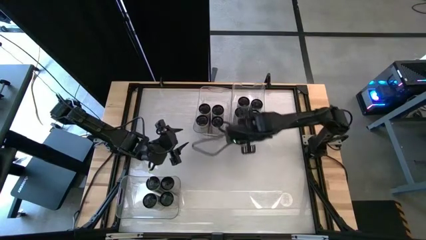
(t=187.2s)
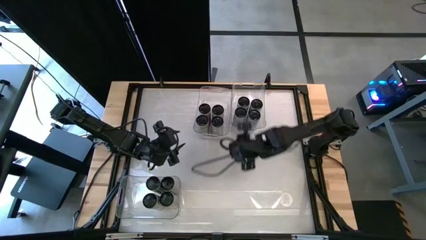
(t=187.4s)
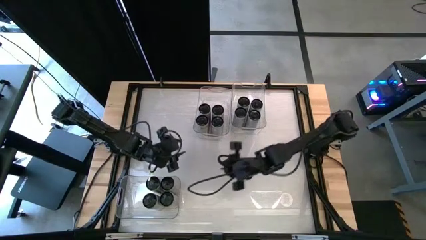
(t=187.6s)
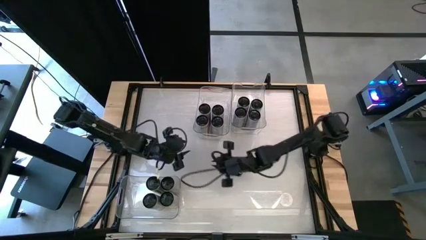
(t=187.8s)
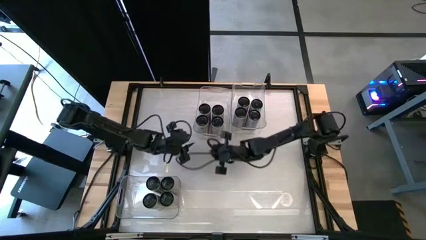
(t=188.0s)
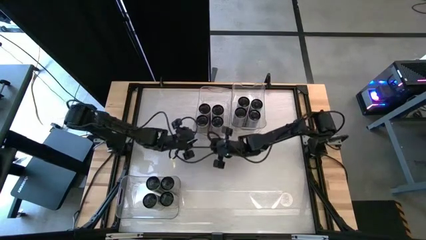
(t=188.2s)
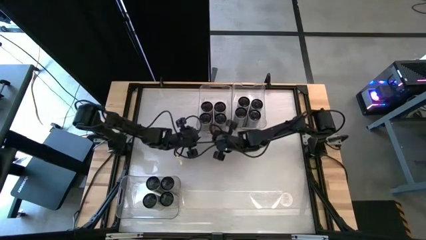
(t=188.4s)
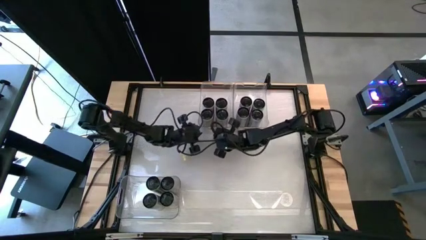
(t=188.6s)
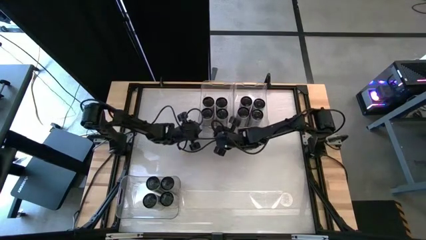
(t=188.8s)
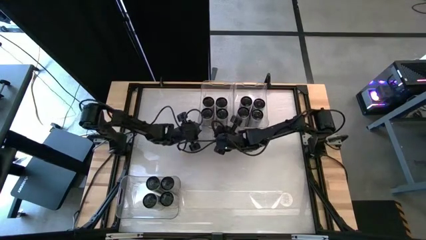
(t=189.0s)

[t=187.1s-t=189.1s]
Task: Sort soda cans
Adjust the top middle transparent bin

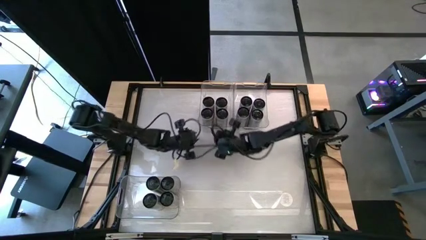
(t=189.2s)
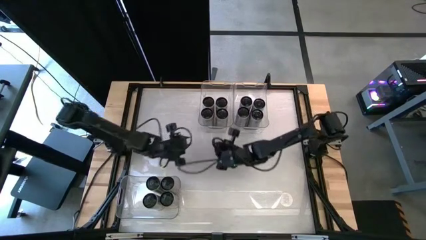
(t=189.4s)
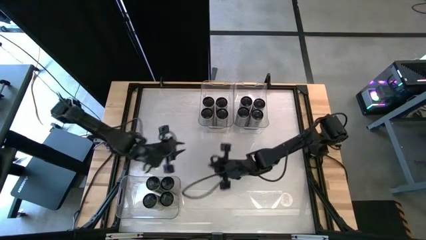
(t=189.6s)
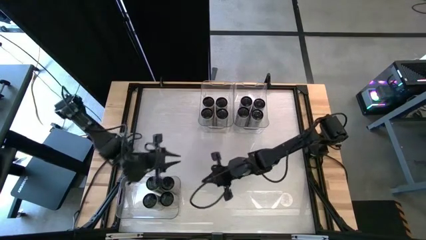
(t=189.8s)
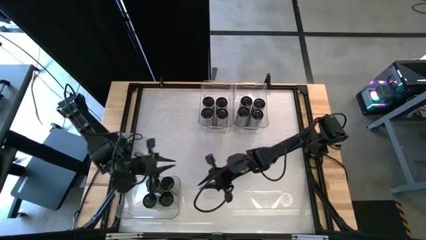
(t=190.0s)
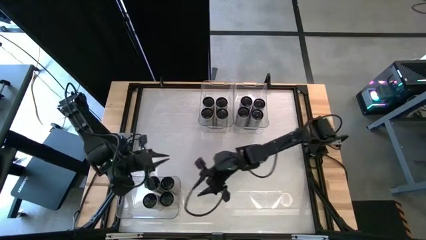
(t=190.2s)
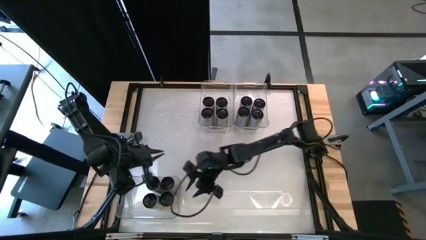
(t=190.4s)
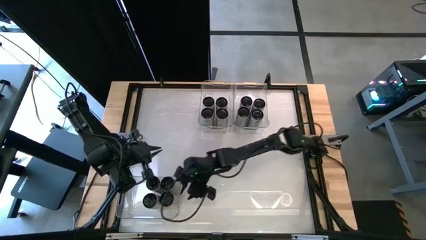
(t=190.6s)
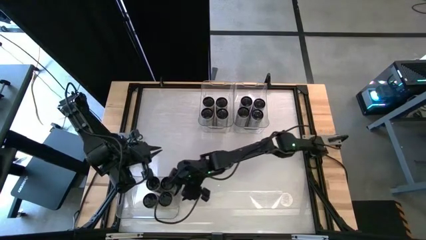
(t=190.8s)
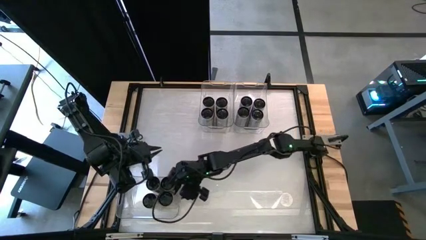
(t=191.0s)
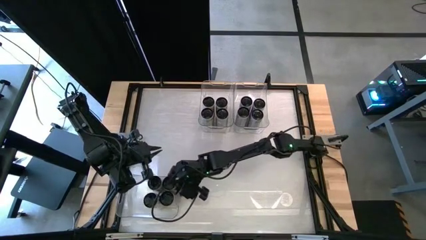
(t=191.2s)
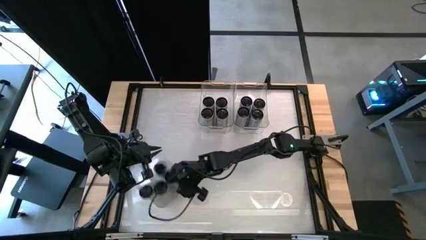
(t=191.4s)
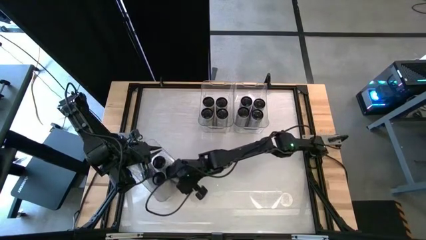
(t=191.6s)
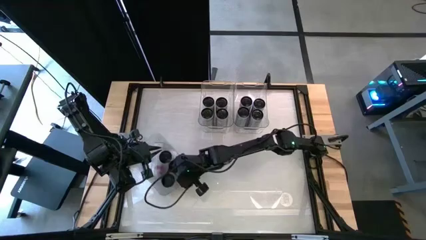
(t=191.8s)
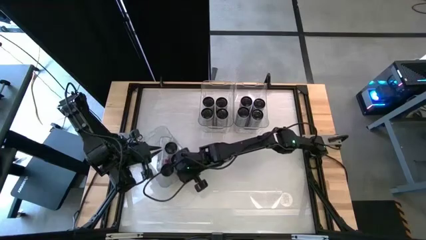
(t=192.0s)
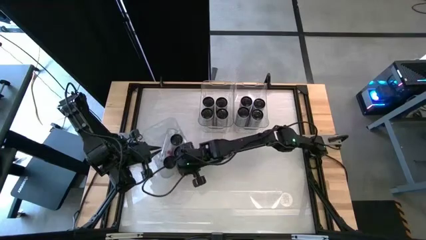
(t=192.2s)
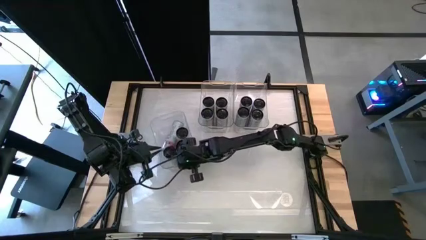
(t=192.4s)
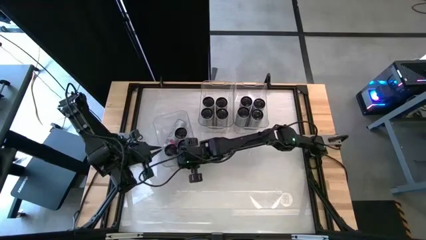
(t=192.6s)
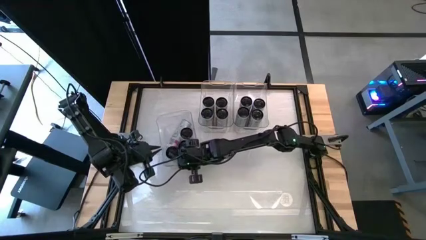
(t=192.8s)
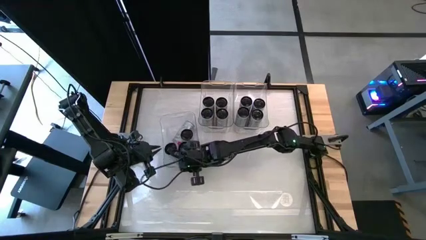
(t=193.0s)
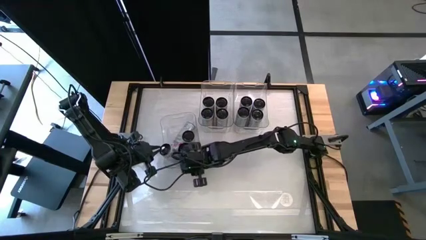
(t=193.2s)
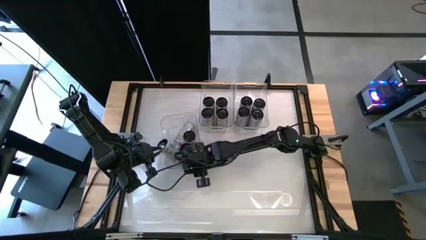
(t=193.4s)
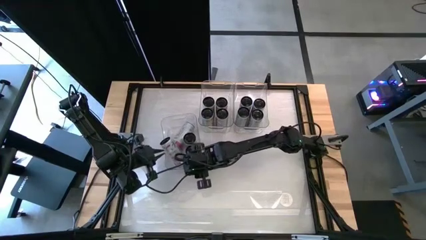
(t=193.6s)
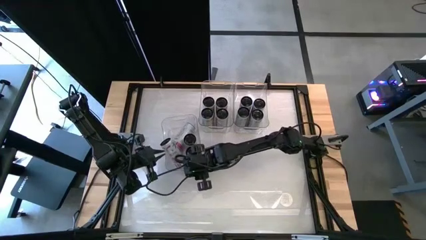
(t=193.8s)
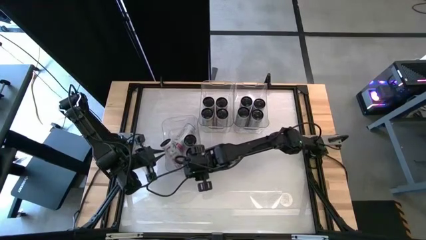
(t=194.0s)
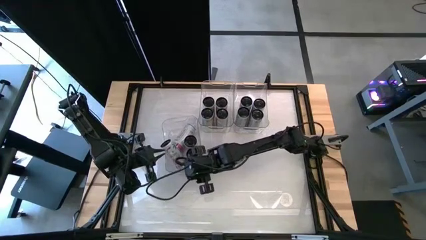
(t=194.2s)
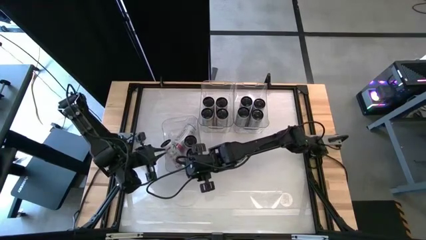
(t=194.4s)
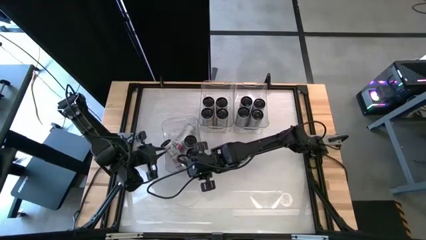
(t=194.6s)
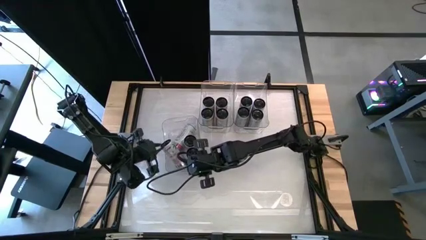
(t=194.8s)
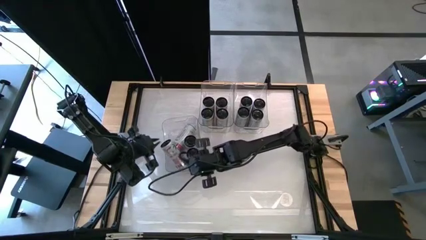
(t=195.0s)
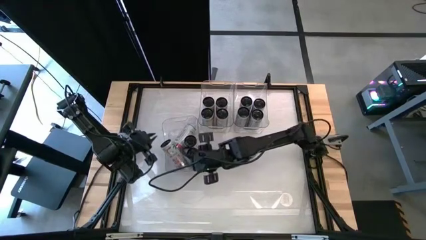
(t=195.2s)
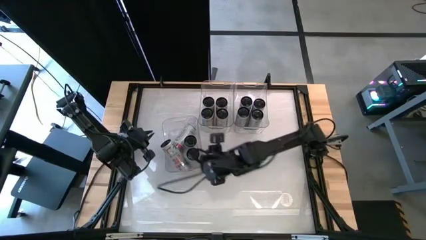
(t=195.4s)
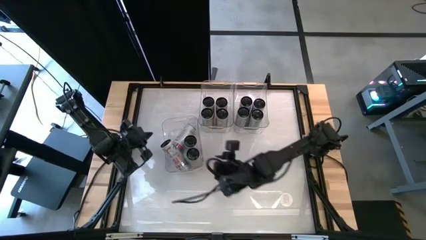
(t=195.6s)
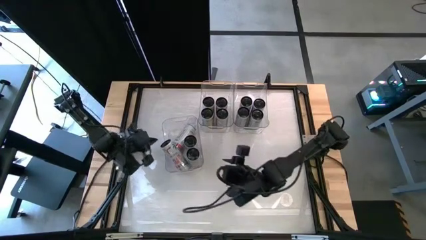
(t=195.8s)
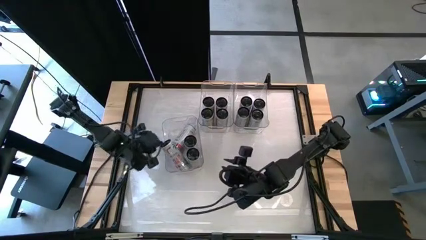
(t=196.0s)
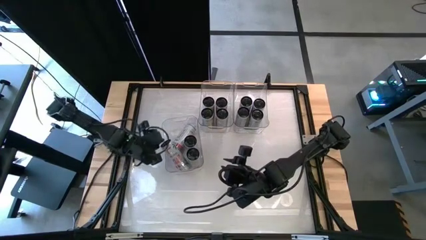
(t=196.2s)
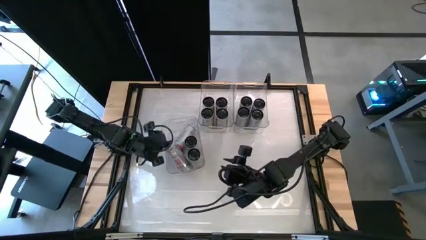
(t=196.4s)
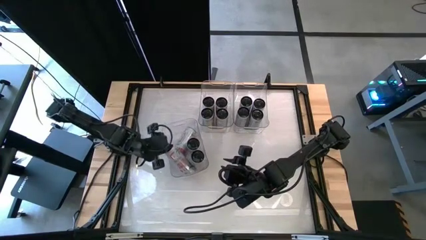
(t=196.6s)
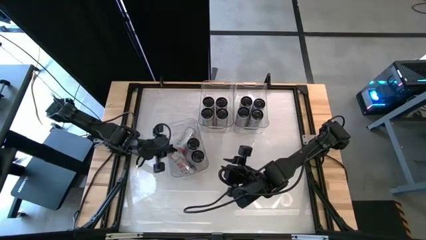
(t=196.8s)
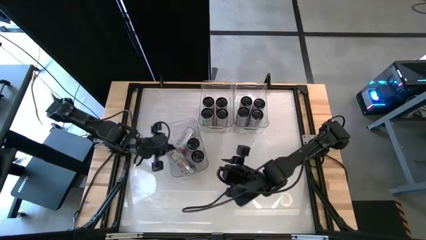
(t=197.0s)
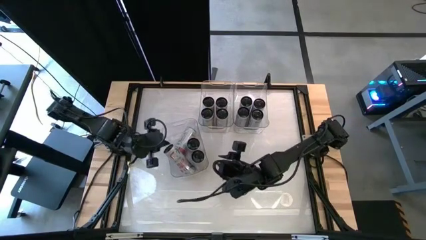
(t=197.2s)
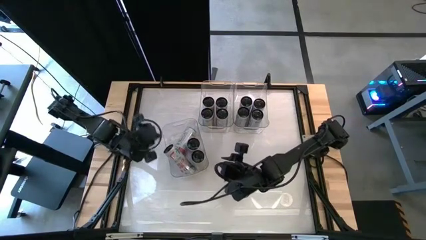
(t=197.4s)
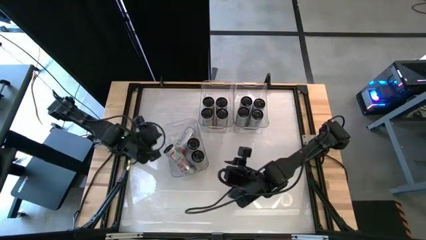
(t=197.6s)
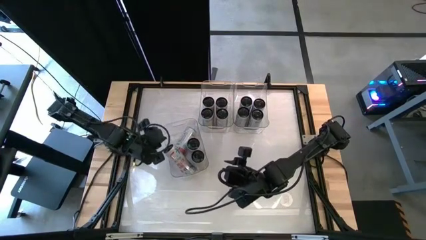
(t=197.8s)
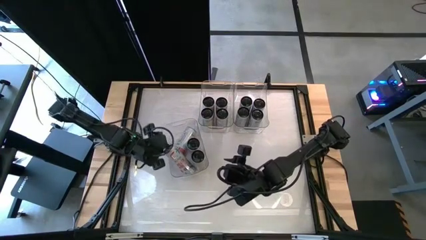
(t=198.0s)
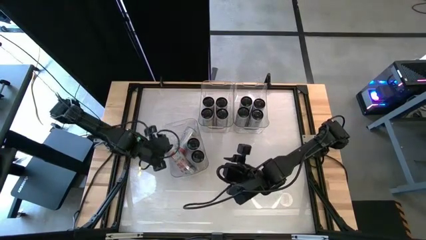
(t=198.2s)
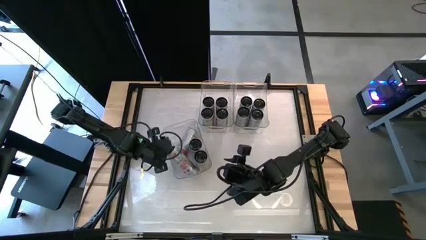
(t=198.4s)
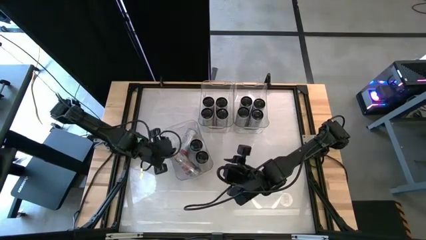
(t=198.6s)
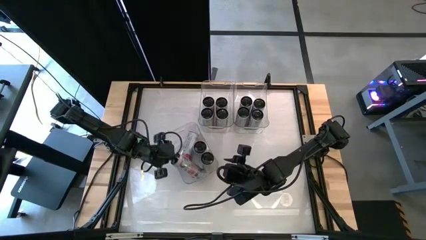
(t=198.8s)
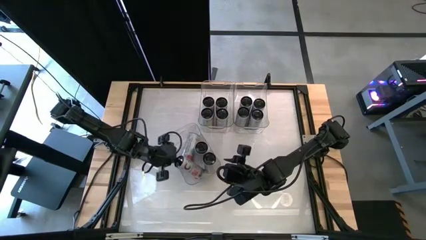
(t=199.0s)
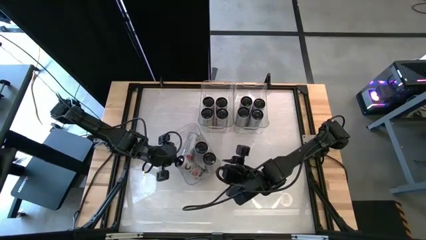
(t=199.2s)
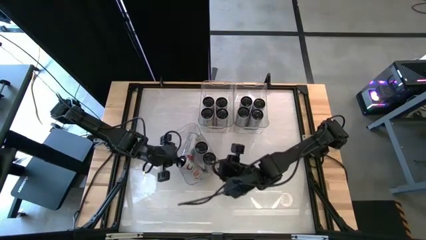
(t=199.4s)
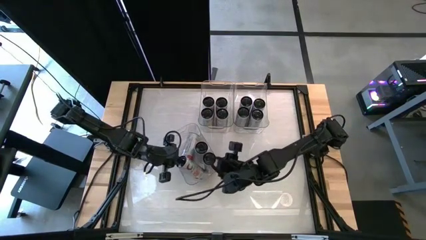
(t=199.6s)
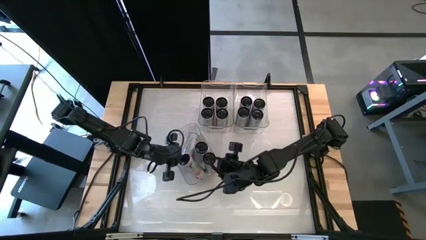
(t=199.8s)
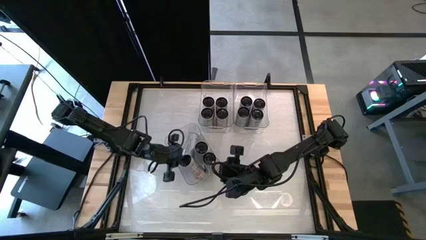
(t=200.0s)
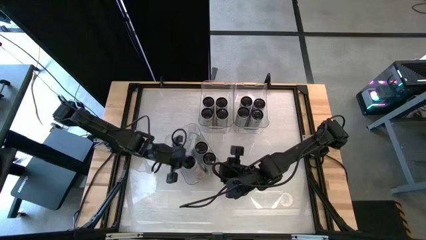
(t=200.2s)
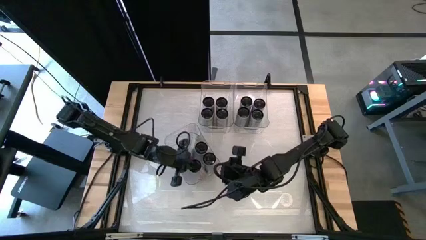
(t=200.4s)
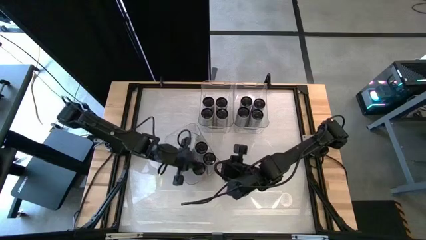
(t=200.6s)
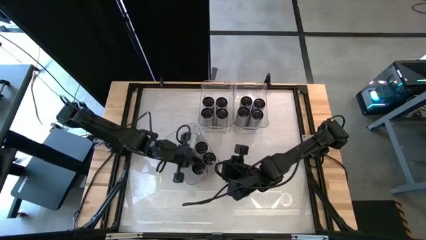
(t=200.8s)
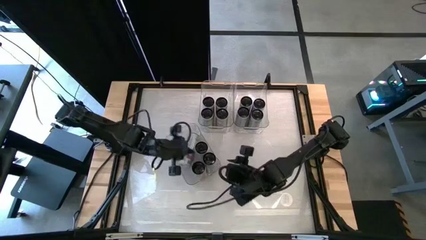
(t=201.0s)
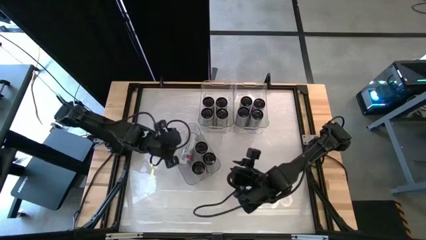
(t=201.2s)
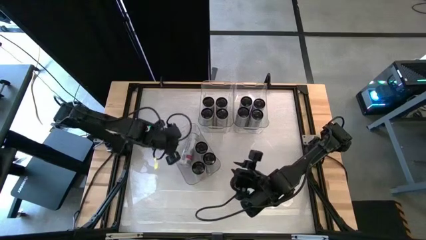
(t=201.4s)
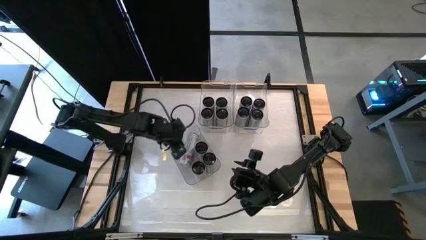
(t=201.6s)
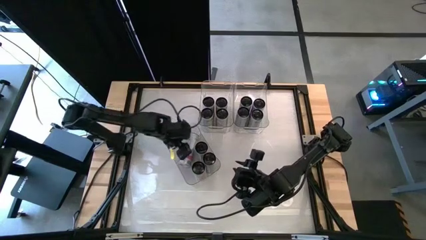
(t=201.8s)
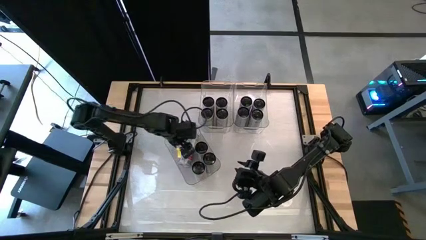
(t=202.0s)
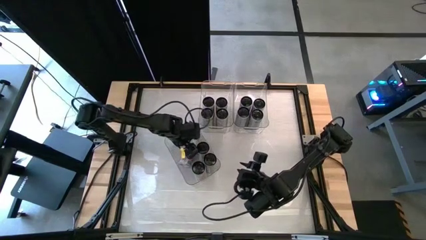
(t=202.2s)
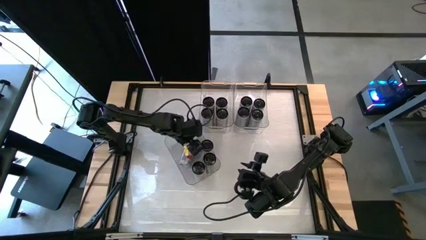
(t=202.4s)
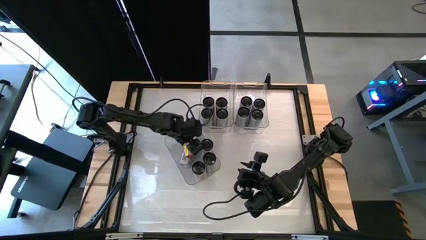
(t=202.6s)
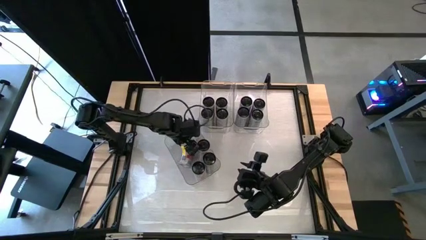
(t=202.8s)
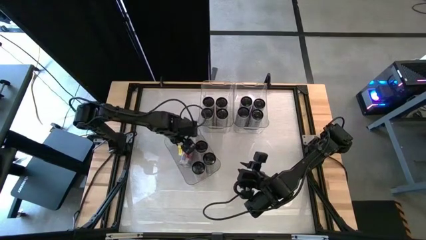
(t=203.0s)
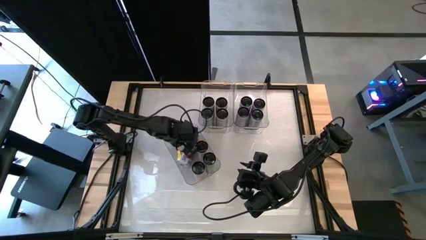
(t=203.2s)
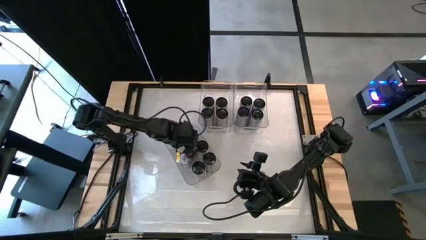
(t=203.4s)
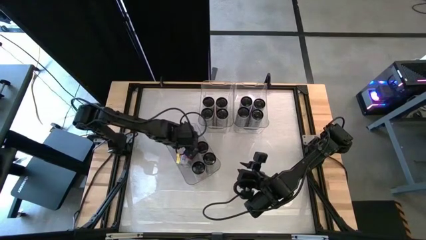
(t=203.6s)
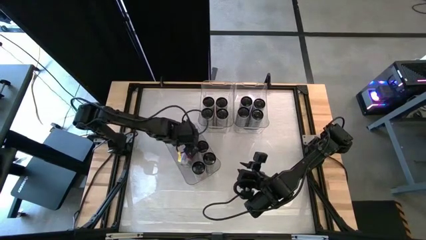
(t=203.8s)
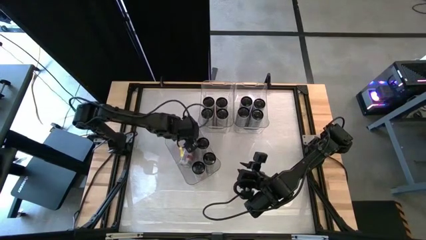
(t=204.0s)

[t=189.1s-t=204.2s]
Adjust the white pink soda cans
